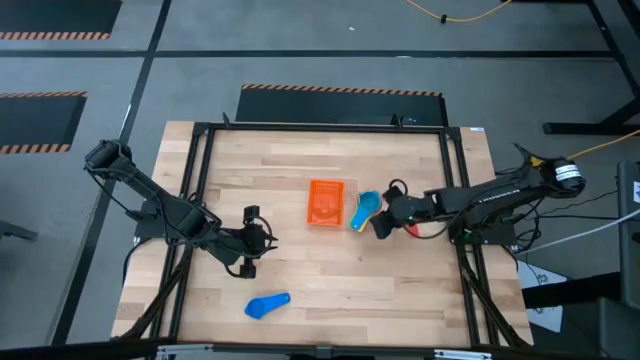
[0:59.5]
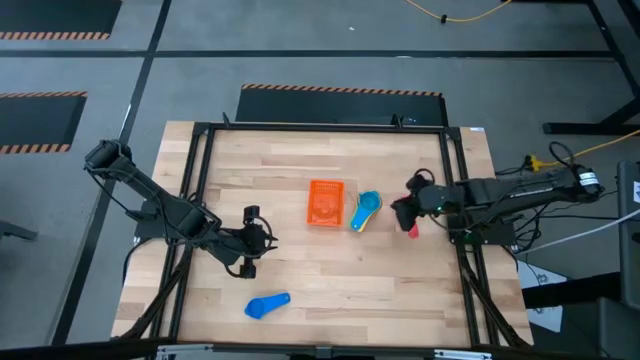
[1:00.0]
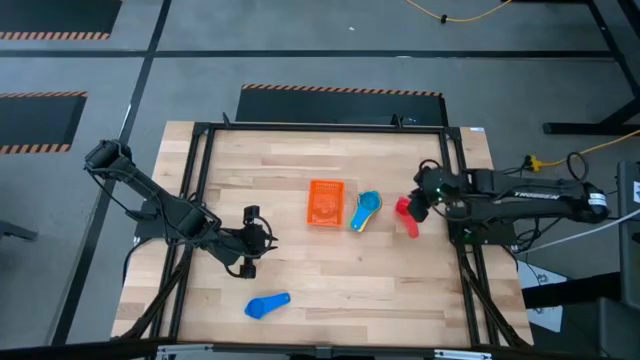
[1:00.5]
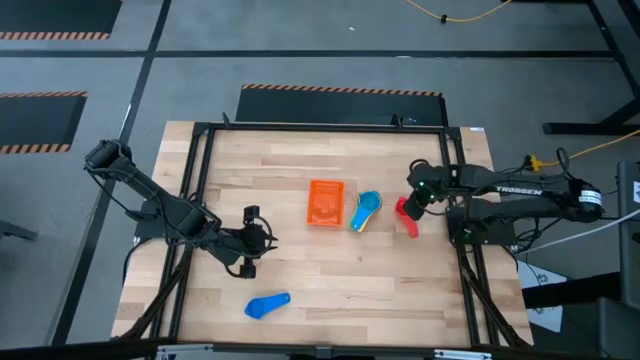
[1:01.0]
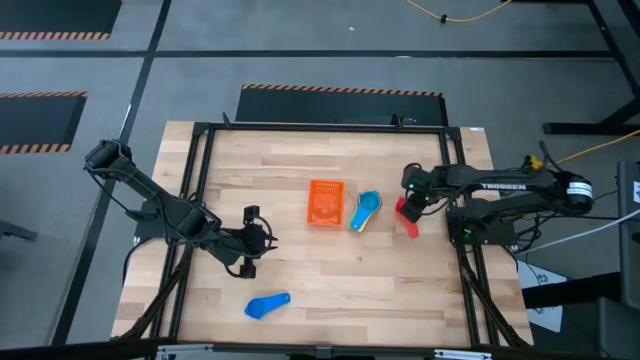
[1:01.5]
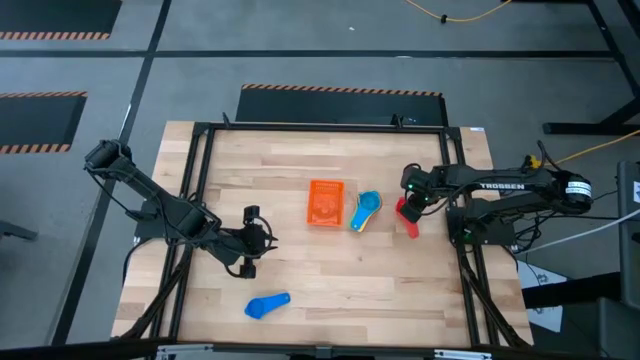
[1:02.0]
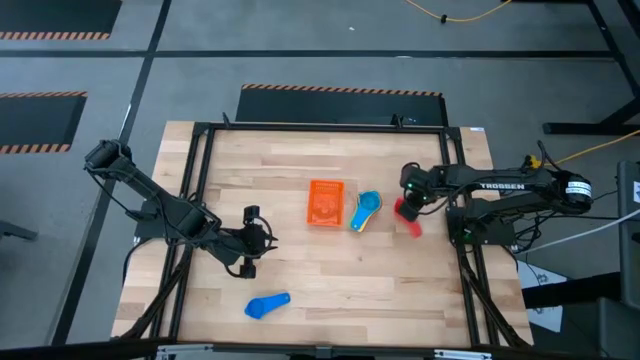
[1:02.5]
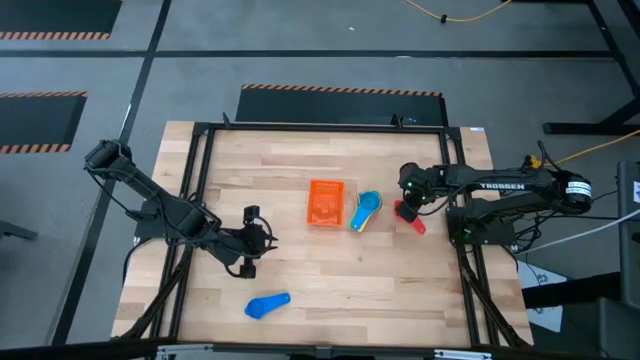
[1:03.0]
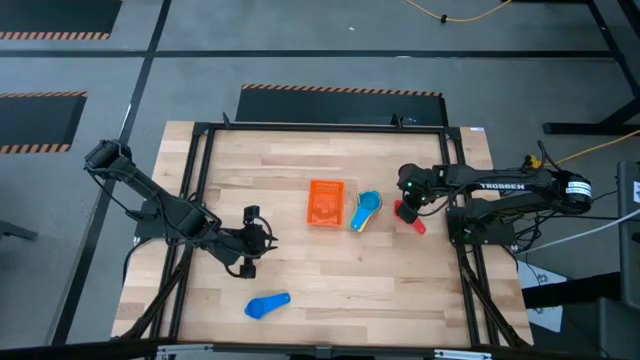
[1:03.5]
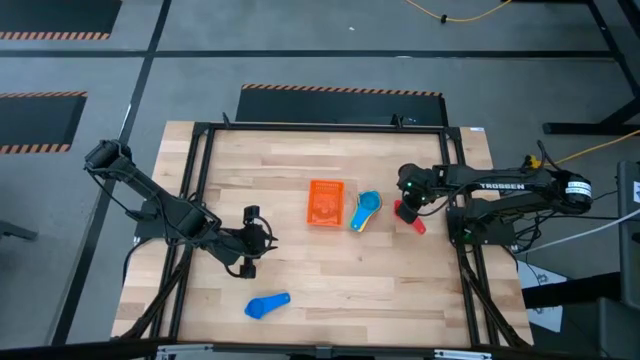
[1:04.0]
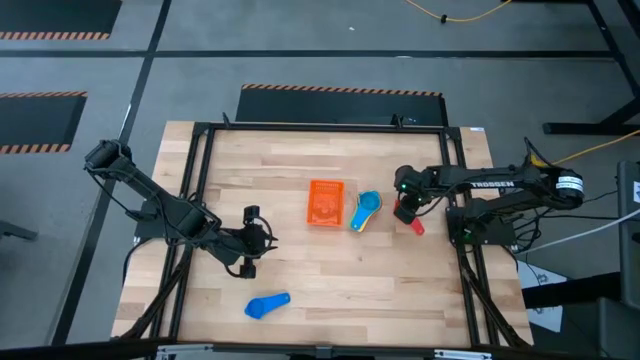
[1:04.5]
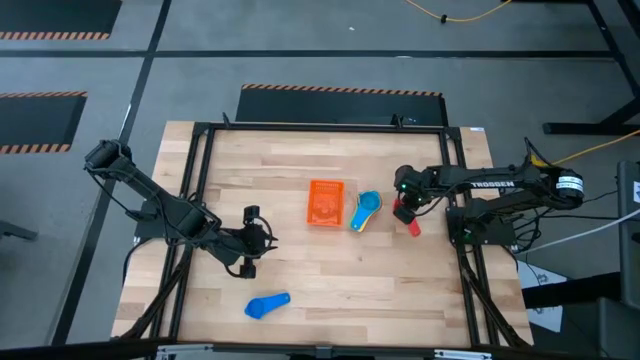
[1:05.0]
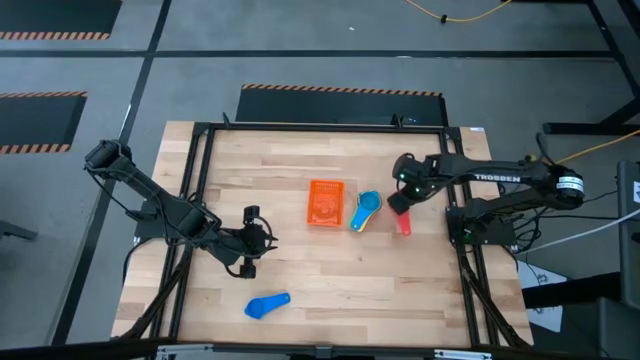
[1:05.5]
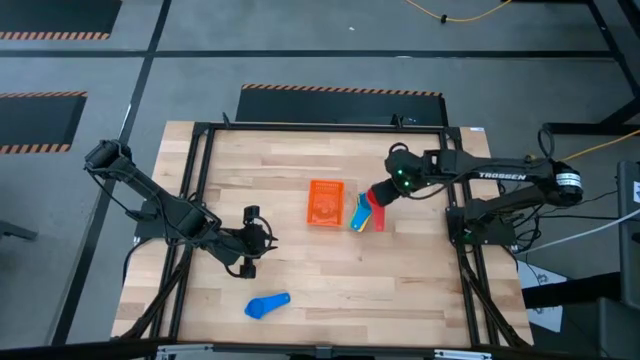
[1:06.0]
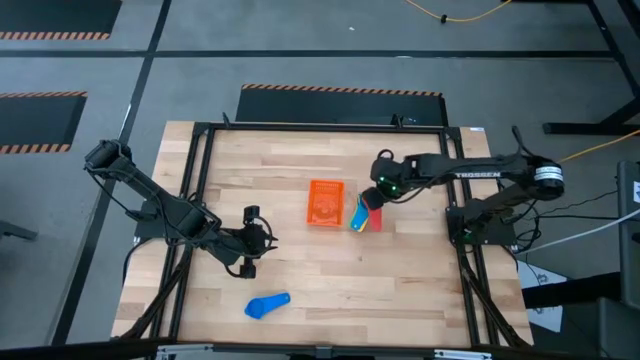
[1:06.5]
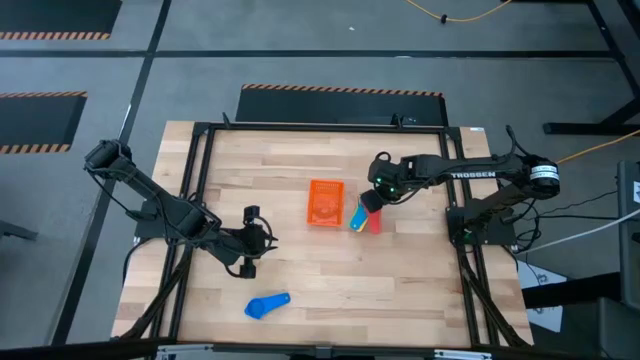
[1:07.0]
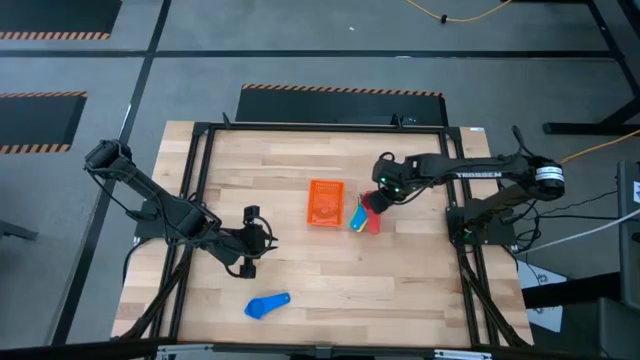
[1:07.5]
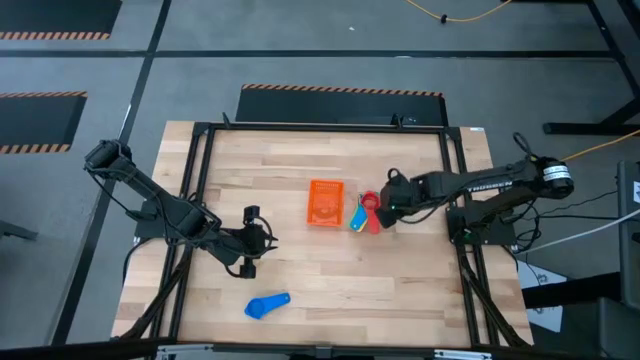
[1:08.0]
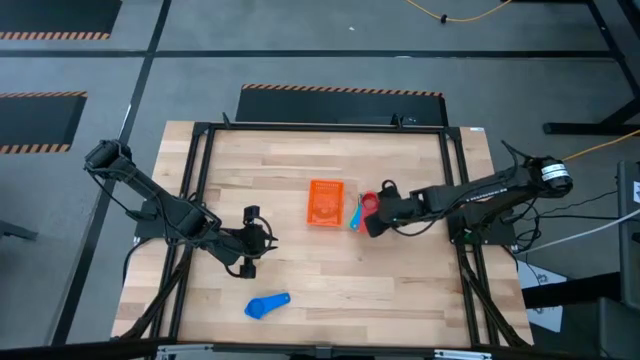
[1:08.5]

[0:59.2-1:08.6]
Task: Nest measuring cups in basket
Stack the red measuring cup on top of the light blue measuring cup

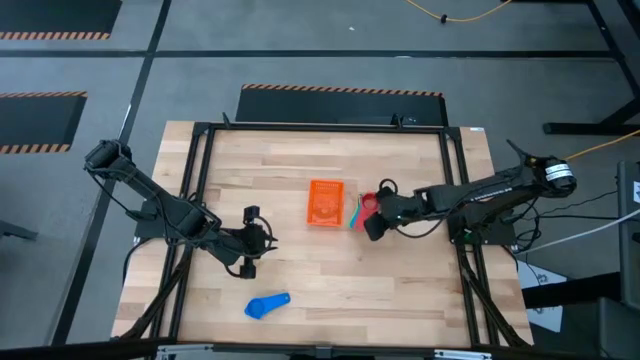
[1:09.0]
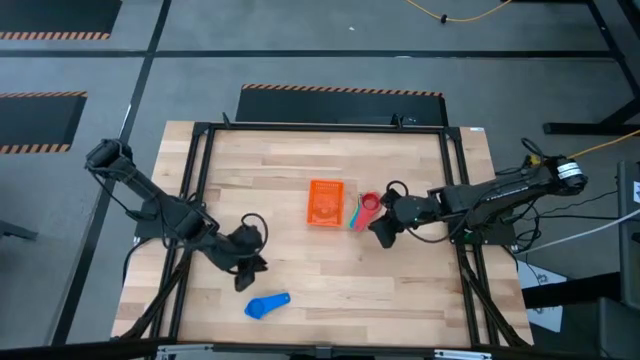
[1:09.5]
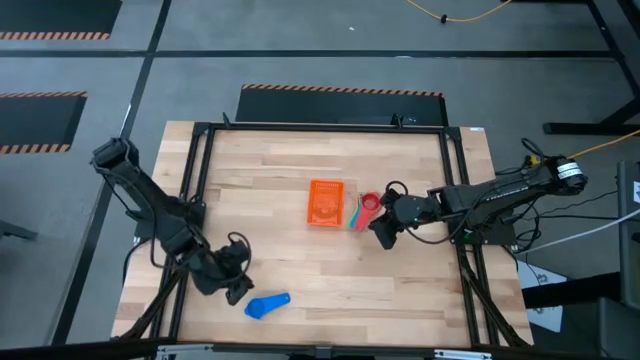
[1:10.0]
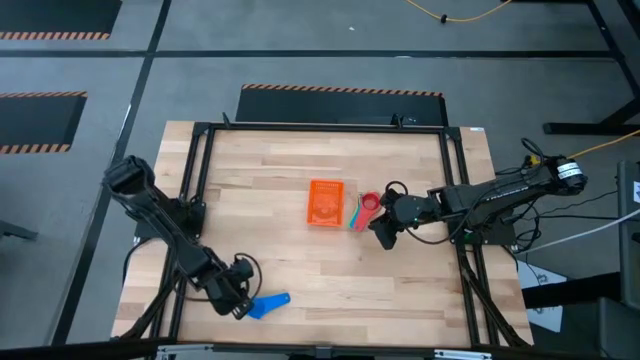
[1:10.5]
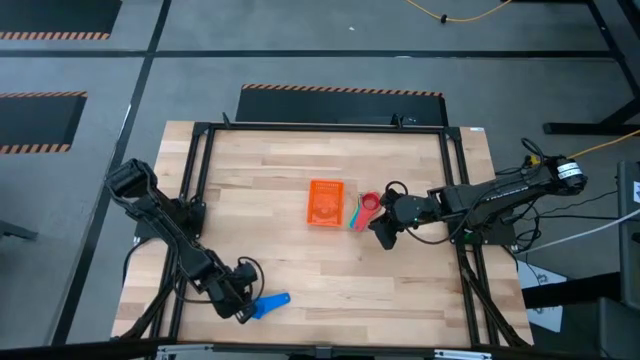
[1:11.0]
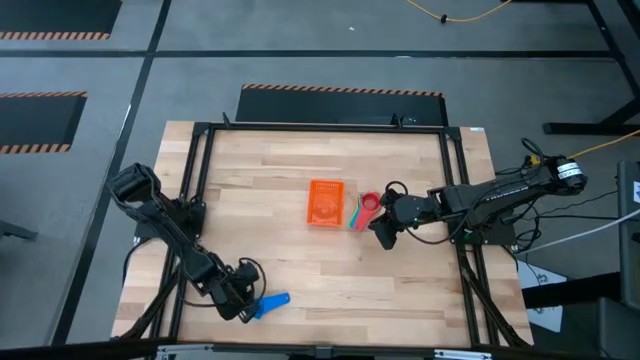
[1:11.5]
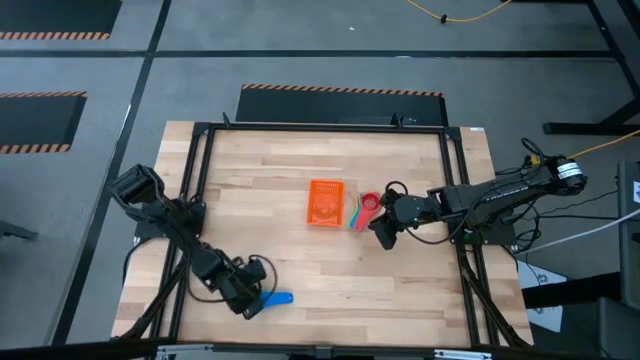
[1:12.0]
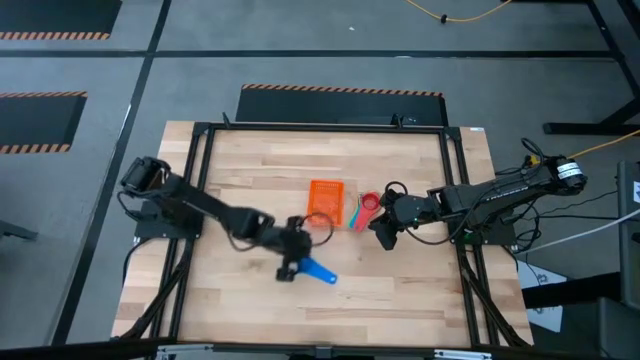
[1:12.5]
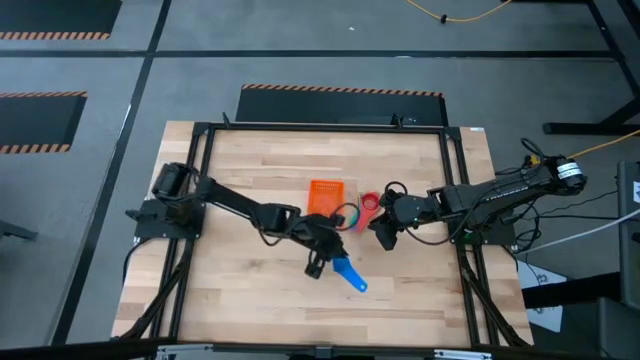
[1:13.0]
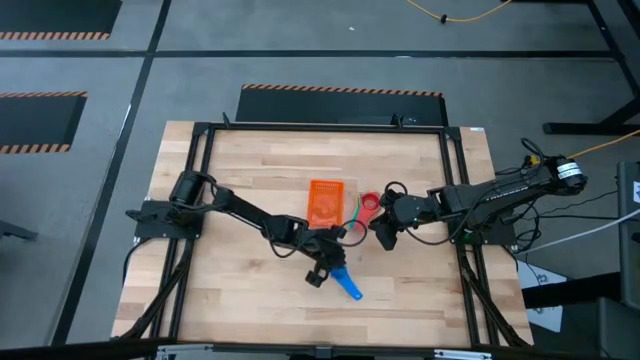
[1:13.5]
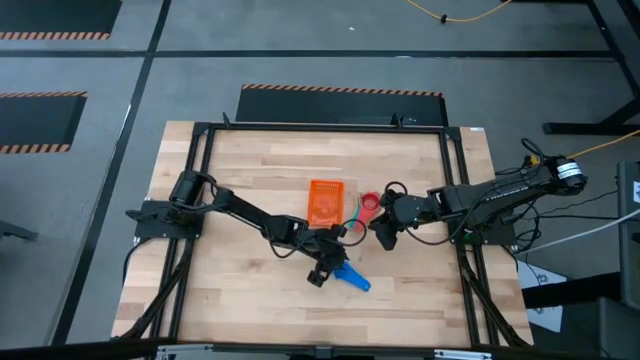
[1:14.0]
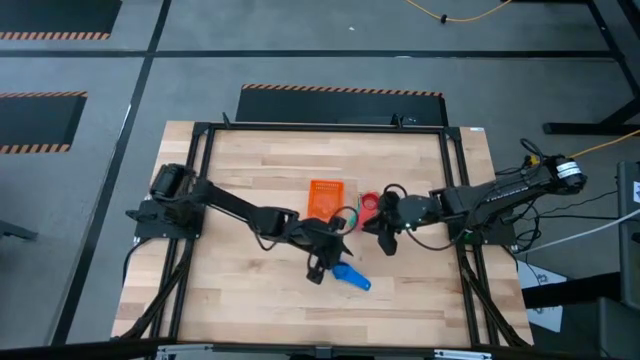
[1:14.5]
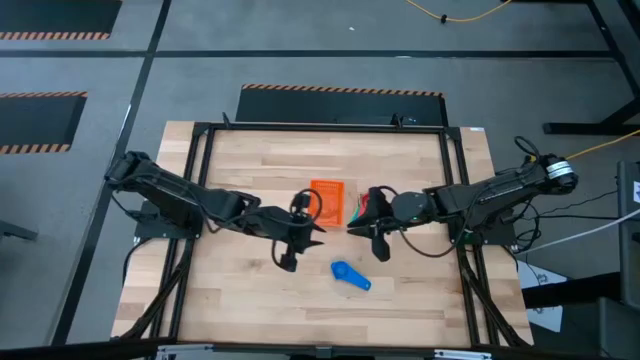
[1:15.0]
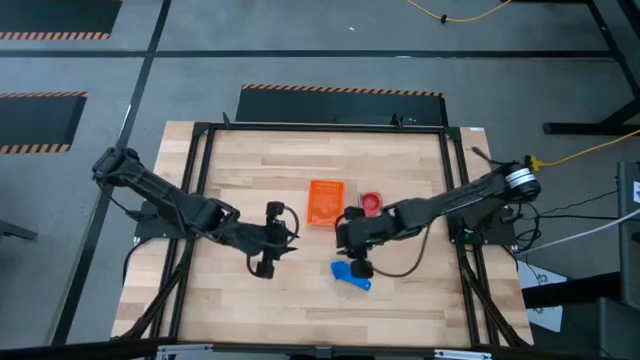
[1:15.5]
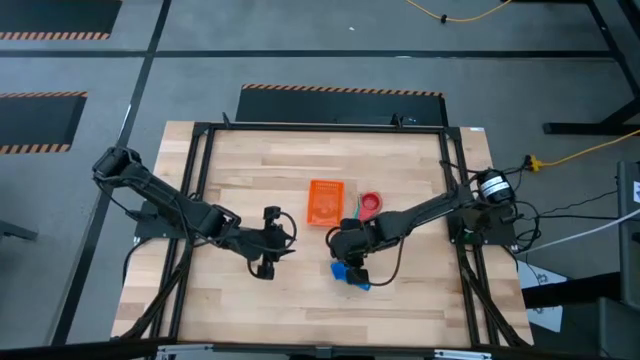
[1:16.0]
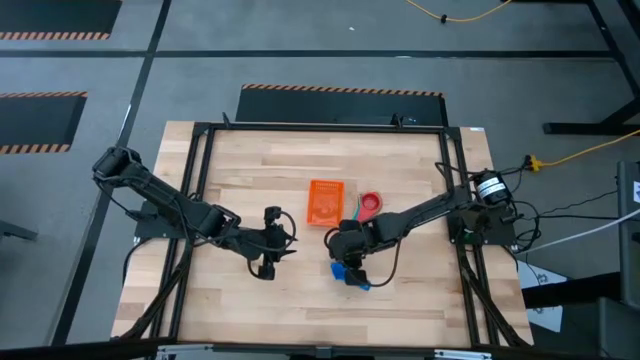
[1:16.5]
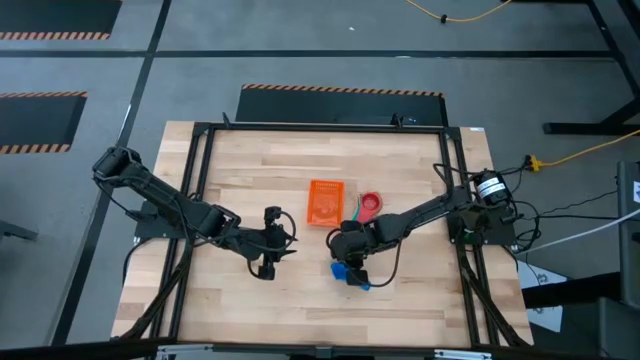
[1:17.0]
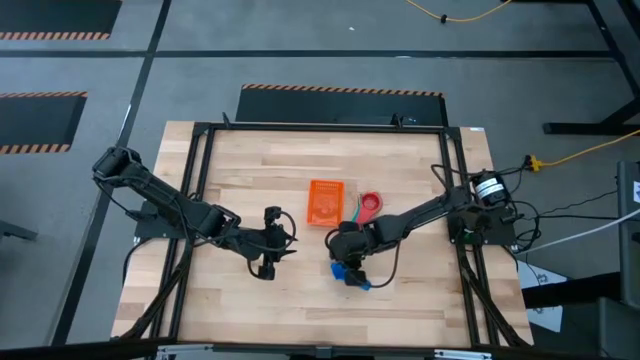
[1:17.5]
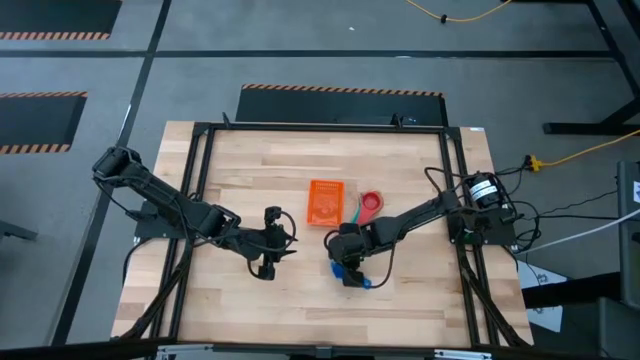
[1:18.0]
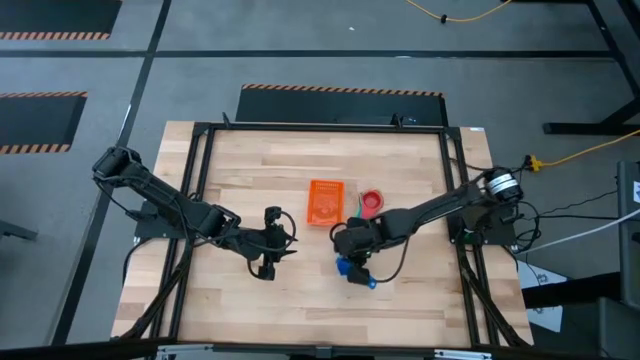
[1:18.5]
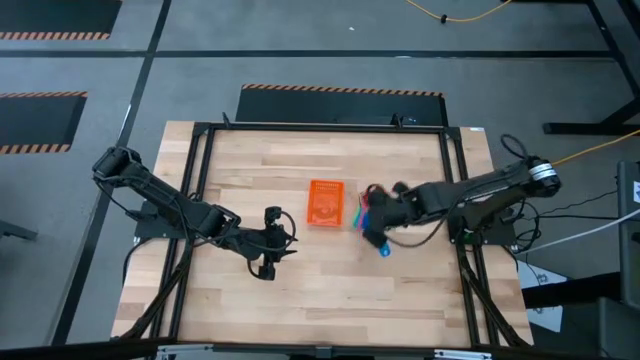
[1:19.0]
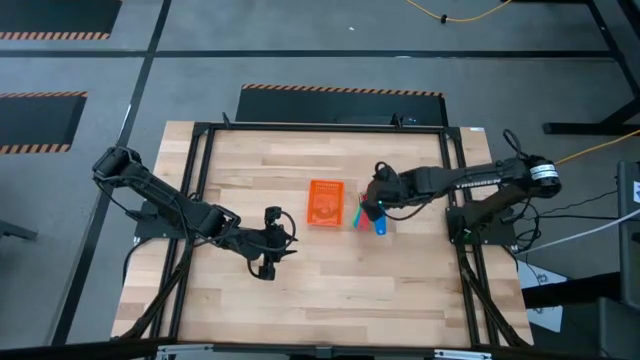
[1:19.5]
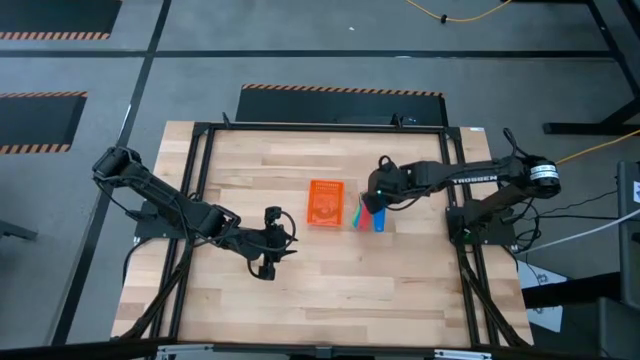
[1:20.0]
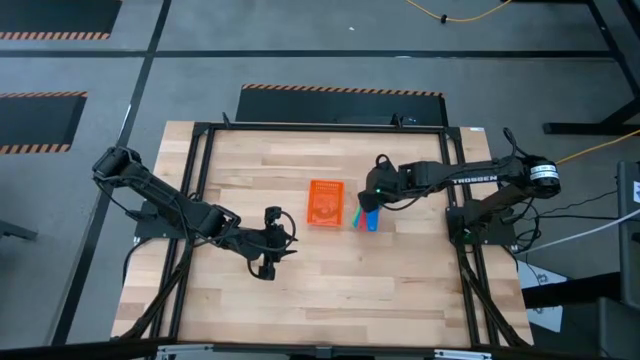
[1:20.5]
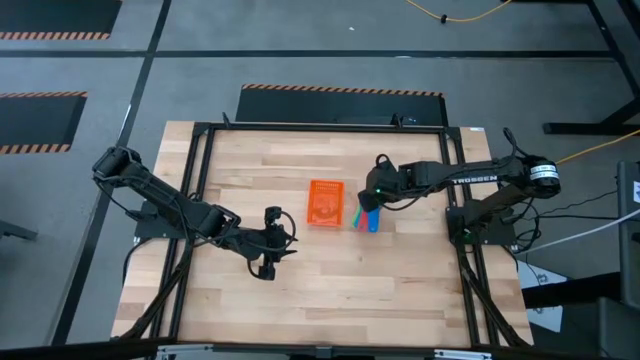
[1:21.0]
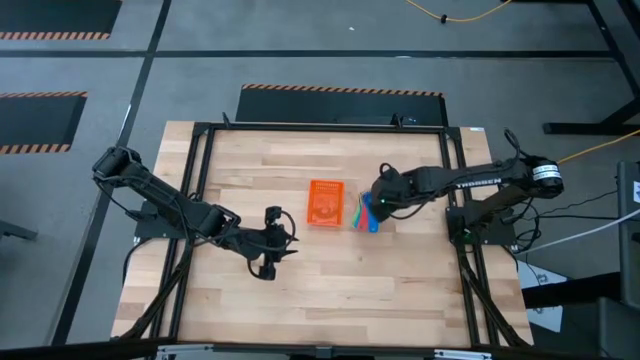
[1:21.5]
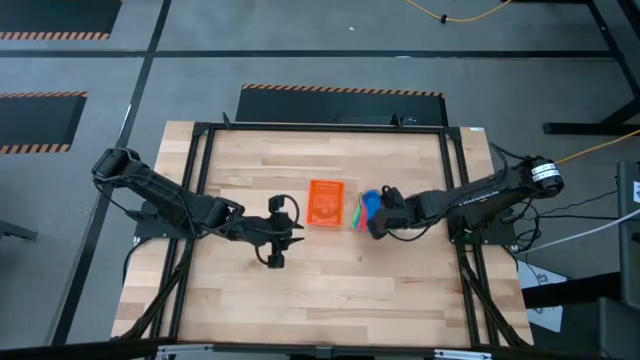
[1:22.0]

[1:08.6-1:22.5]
Stack the light blue measuring cup on top of the red measuring cup
